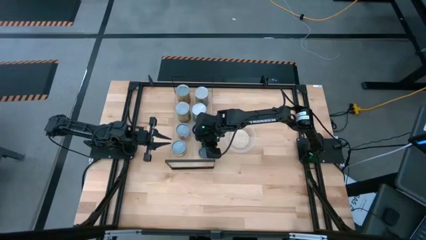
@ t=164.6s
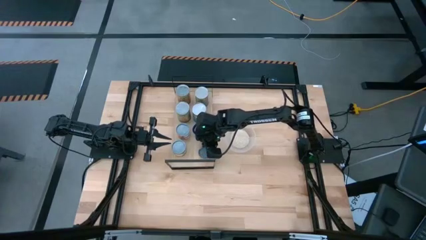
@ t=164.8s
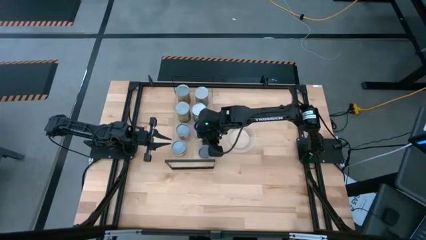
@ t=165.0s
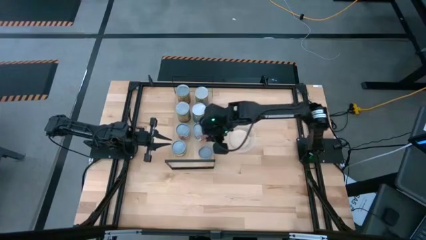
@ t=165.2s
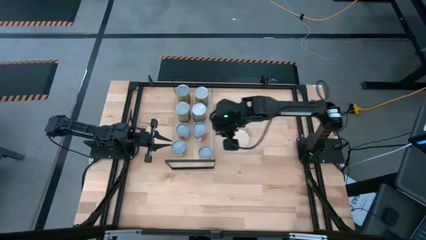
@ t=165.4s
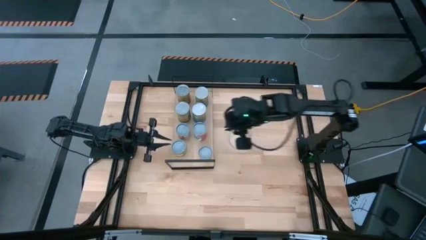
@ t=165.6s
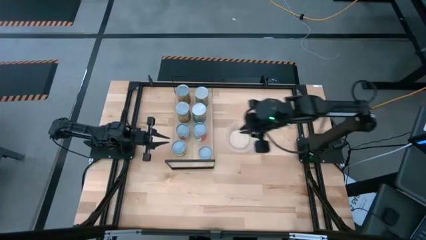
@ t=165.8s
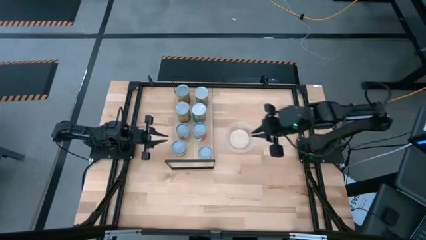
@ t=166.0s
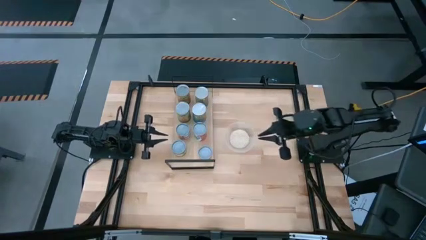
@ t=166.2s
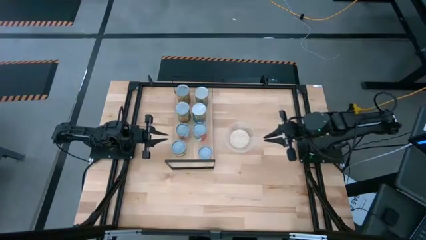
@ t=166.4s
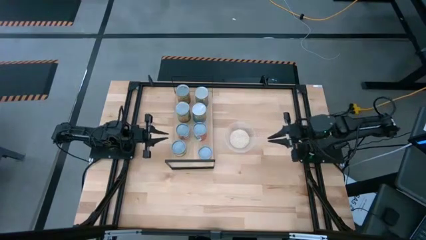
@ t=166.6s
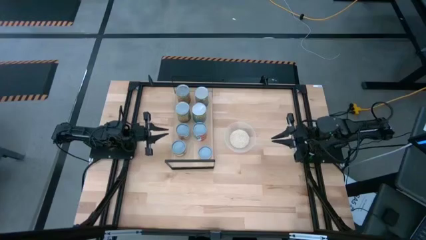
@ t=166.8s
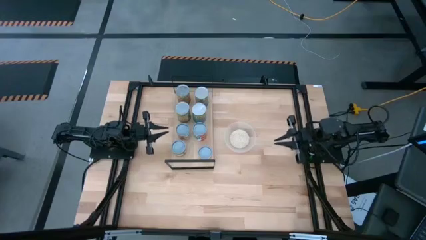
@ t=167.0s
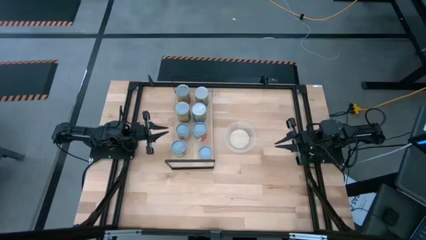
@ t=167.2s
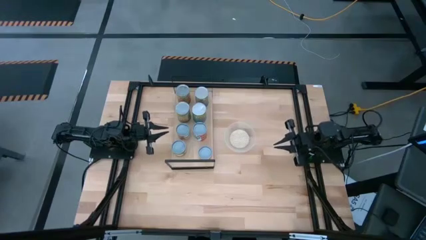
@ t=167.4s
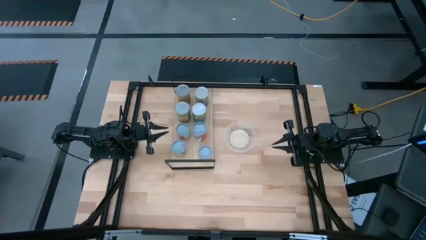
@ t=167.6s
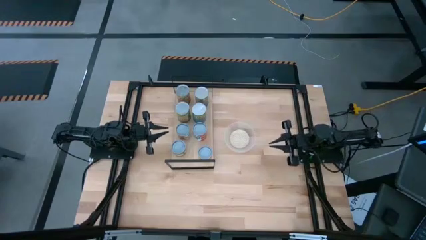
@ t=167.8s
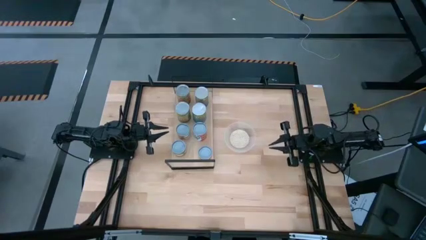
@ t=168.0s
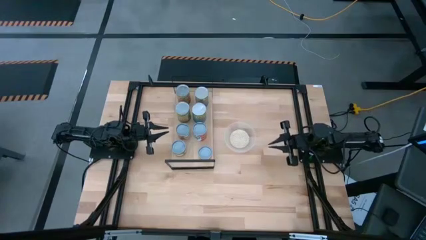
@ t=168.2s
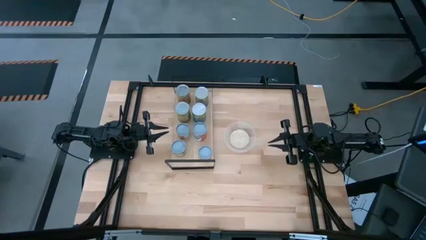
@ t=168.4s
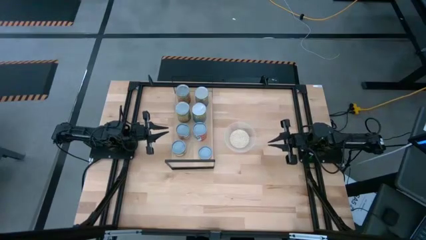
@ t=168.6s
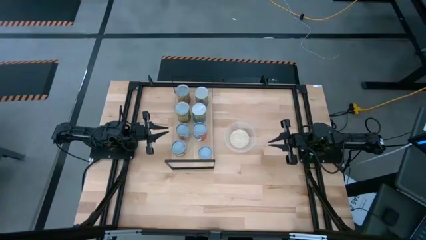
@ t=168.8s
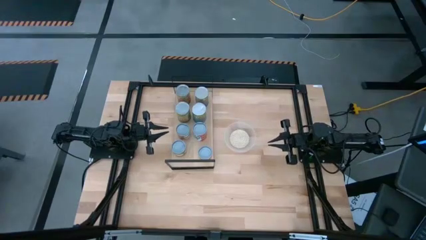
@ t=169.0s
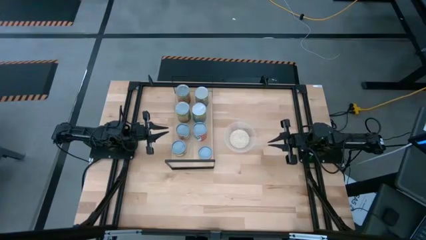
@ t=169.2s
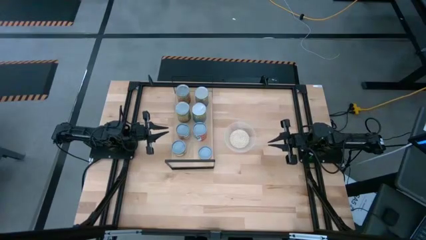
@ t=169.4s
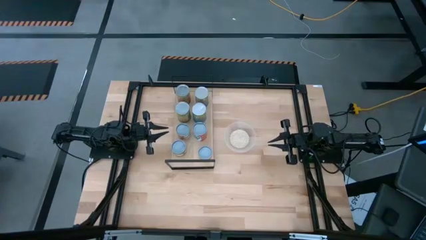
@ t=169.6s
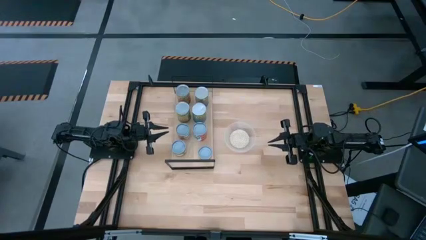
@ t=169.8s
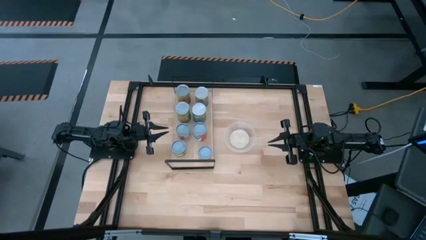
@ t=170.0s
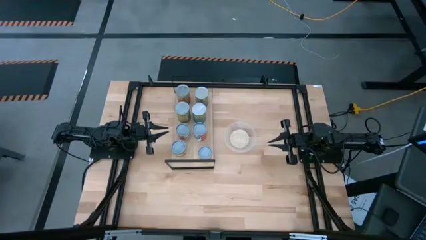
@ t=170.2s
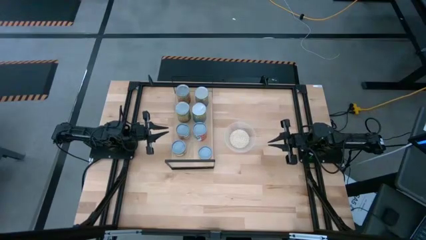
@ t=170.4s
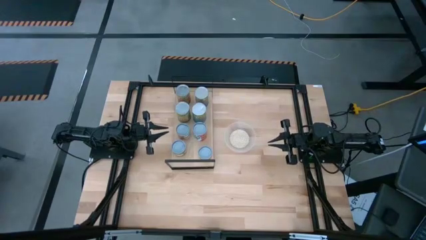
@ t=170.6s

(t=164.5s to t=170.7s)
Task: Pick and place cans onto a shelf
Return to Home Position

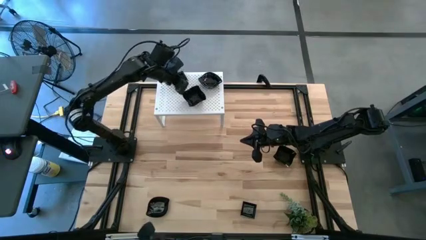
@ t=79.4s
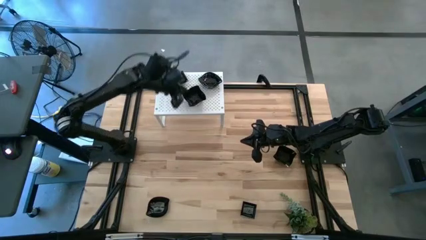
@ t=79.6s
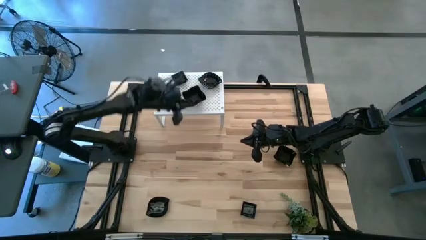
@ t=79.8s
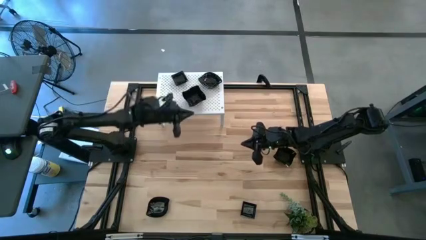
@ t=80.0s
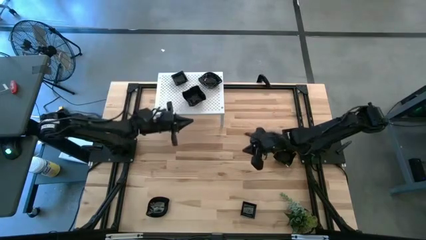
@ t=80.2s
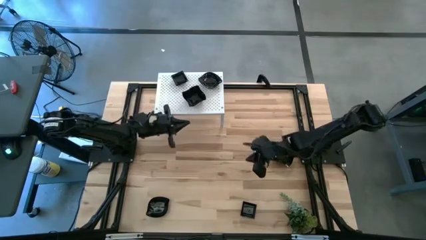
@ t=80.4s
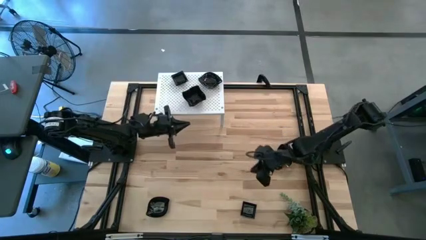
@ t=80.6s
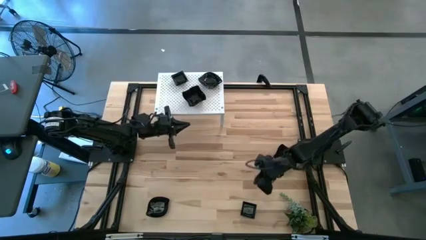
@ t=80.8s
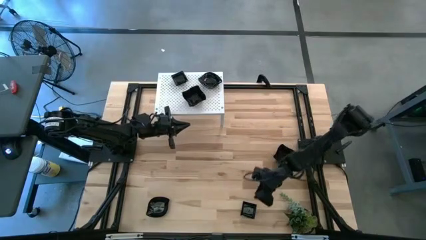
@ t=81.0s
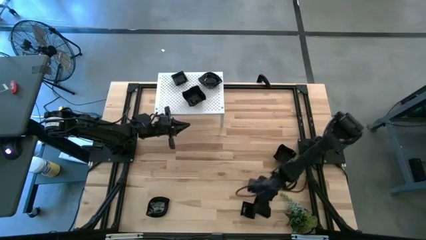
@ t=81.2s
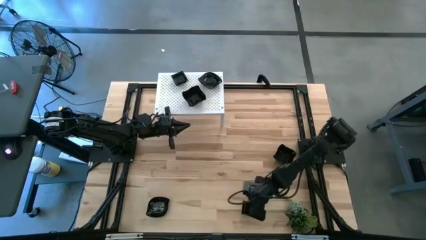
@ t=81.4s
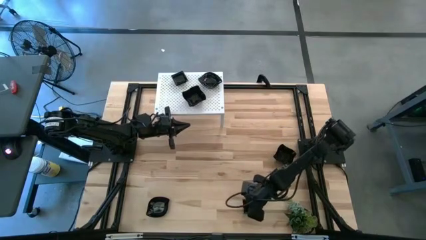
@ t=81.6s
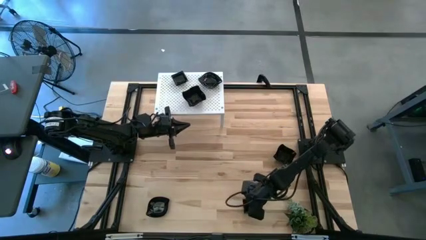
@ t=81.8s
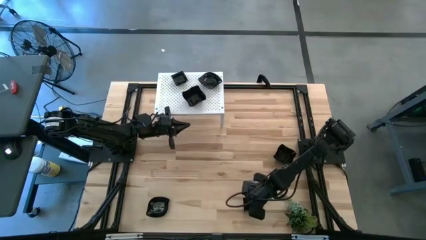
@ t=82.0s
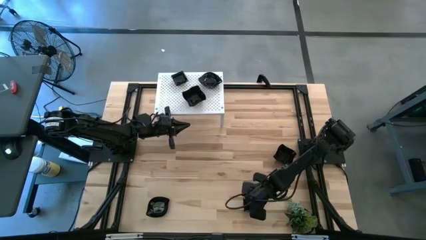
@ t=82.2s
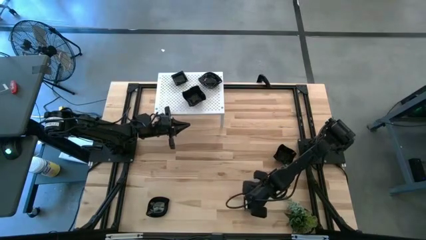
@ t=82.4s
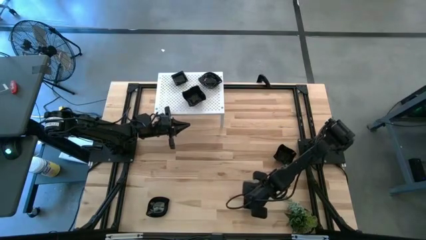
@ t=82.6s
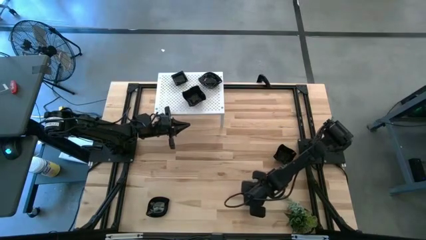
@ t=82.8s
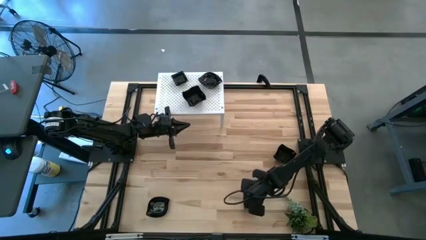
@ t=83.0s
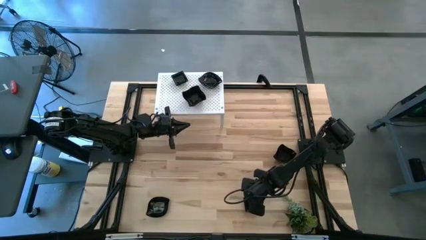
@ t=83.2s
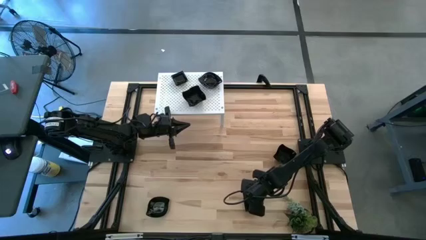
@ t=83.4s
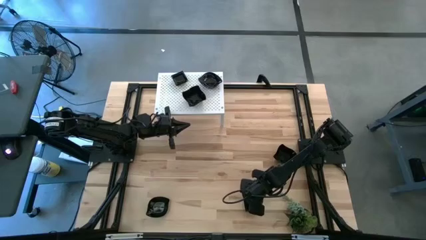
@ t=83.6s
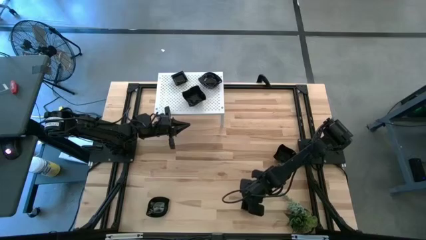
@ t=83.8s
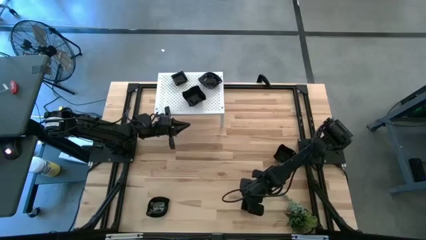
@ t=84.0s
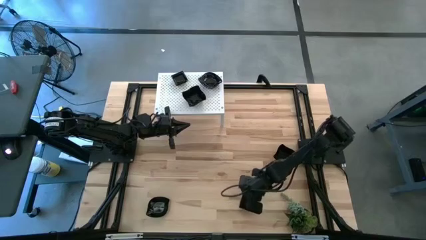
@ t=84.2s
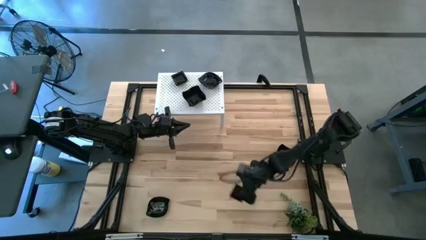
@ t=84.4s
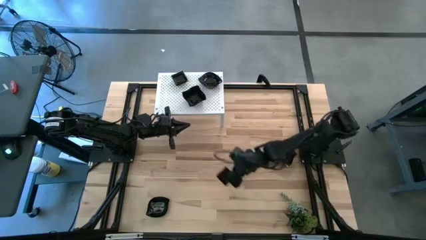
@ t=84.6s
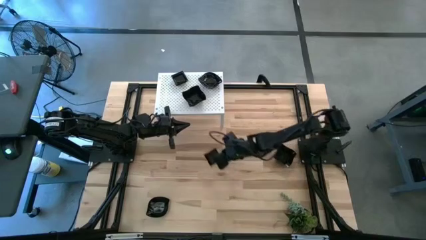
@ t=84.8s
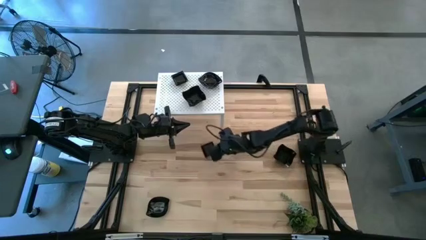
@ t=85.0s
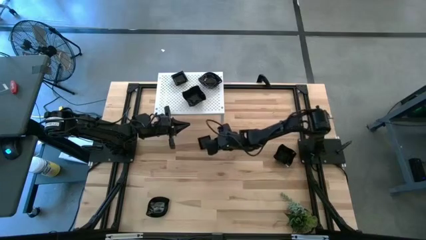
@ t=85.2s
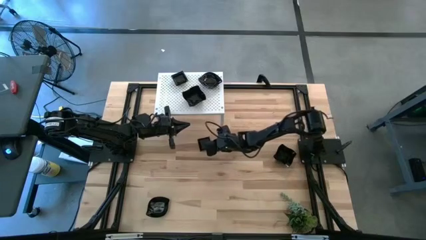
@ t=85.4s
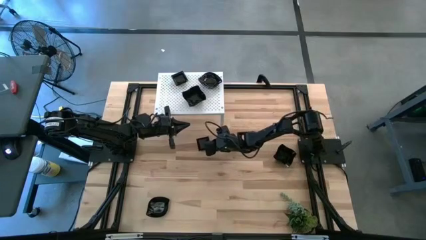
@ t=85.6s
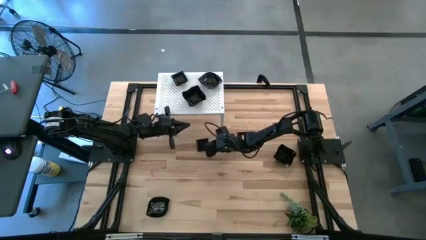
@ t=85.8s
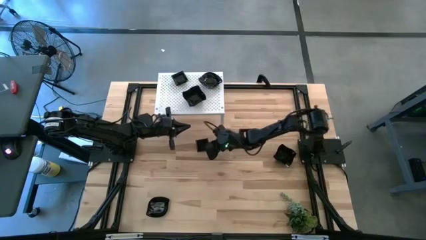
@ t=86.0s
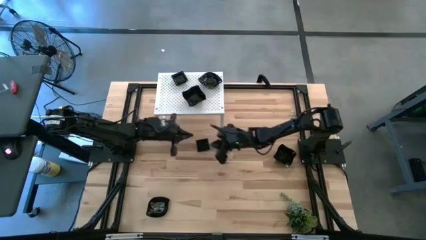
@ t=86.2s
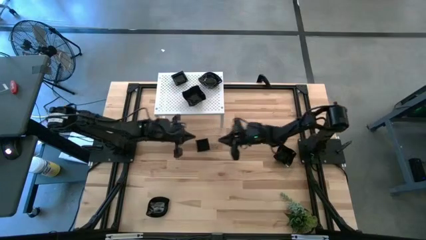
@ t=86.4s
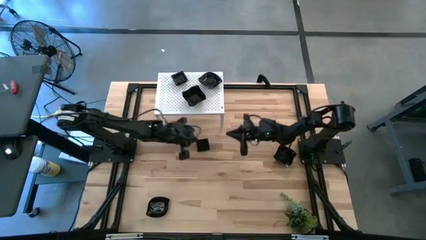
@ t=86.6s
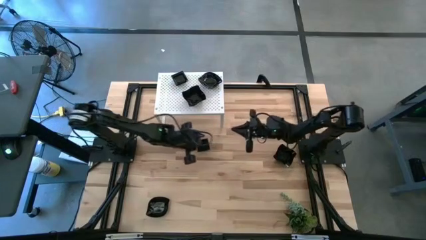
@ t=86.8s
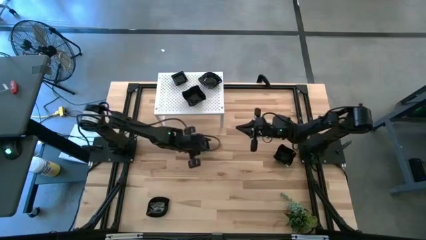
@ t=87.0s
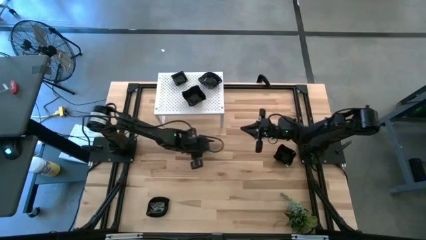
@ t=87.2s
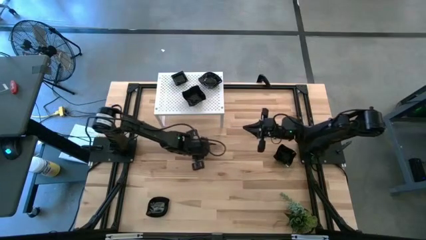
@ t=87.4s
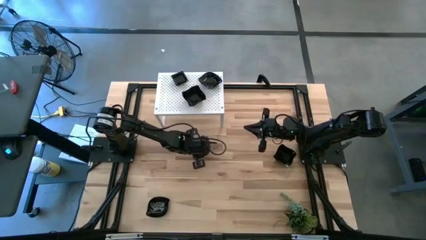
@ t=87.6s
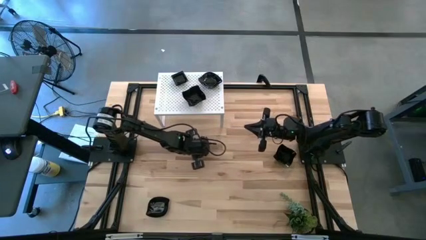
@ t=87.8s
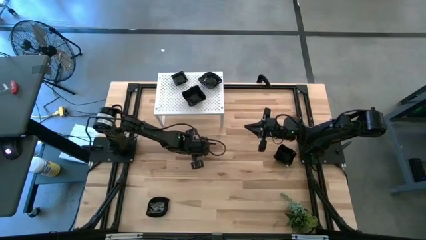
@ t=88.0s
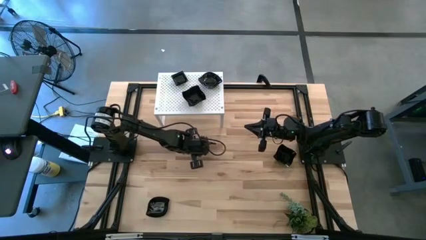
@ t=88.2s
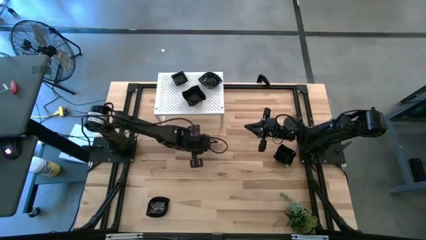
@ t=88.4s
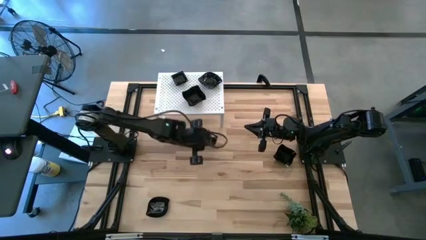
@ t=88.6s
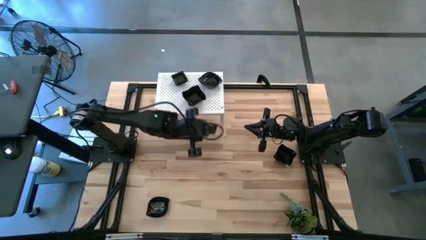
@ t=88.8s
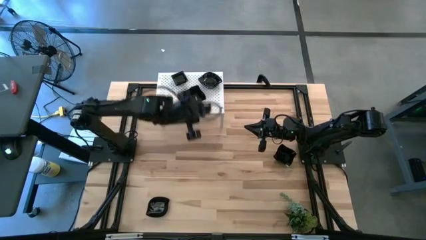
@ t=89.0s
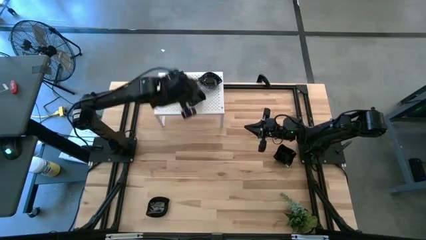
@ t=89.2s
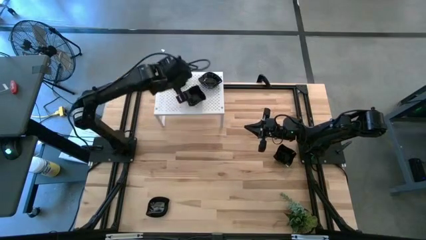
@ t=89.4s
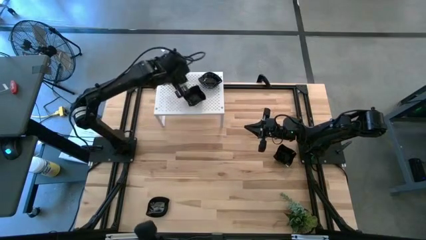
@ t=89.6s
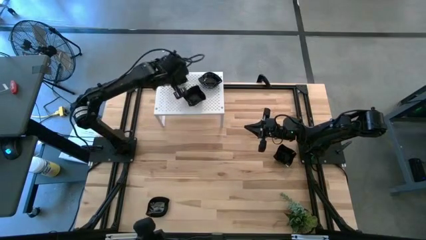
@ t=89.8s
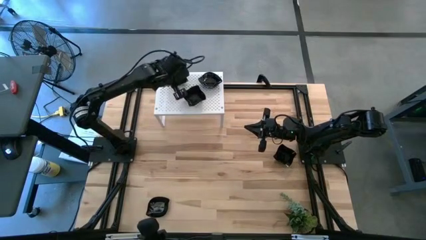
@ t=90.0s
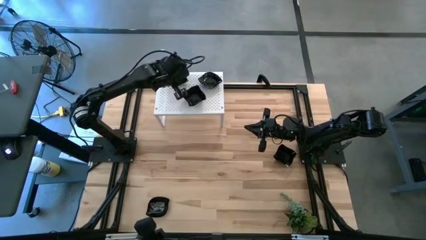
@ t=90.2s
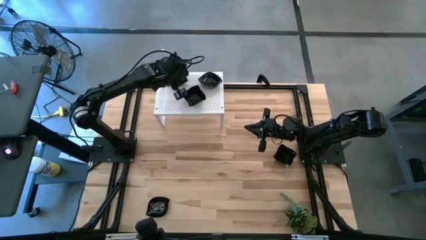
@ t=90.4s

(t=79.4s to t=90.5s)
Task: Pick & Place Mini shaped plates
Stack the black square plate on top of the black square plates on the shelf
